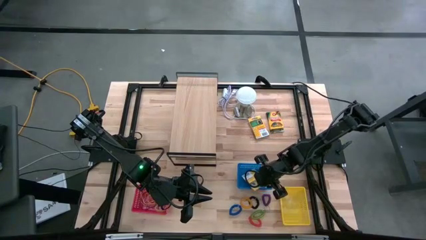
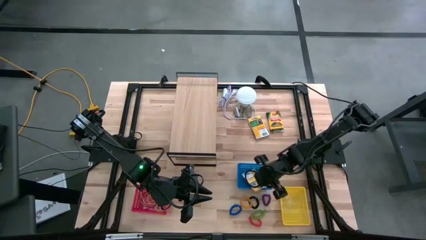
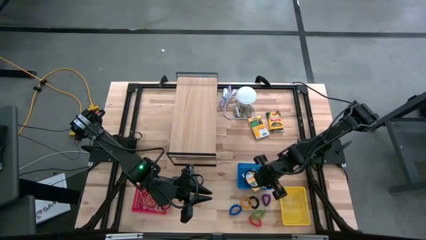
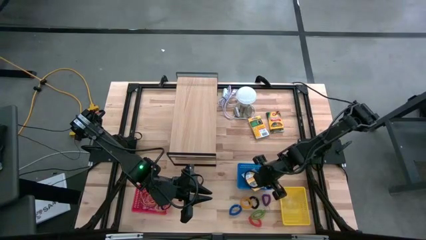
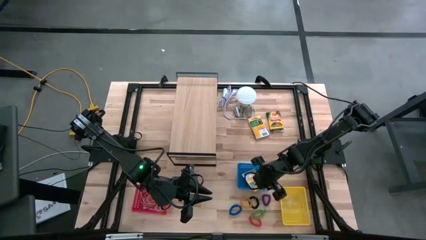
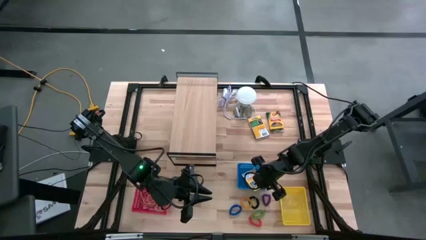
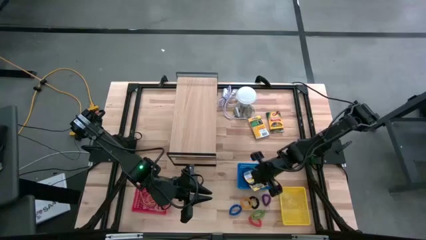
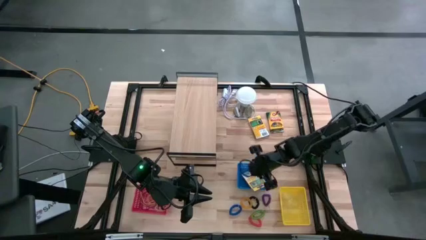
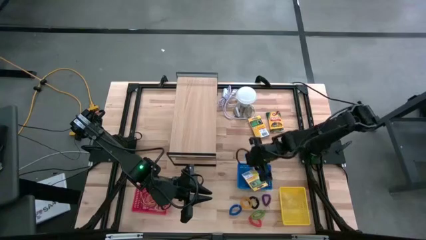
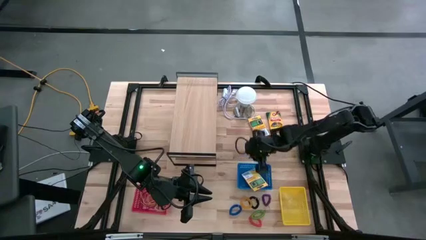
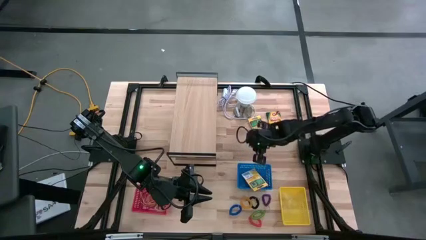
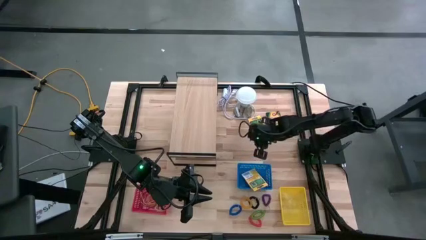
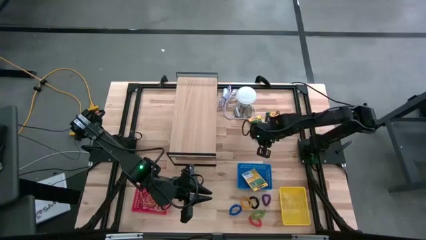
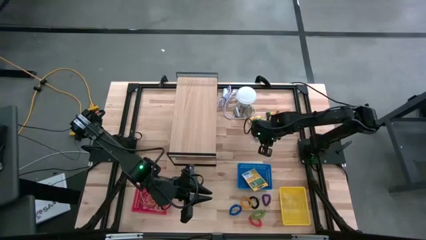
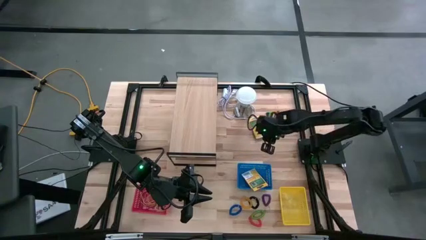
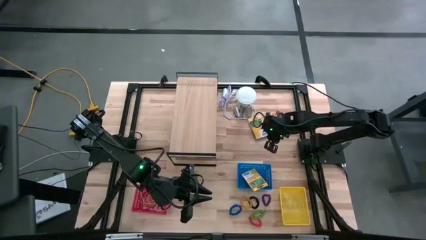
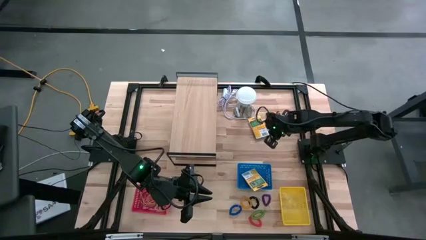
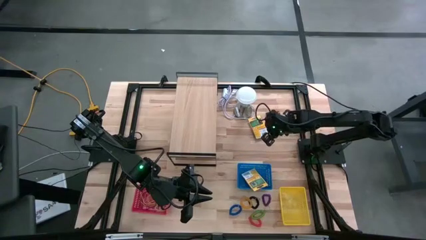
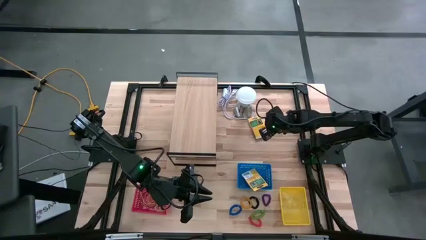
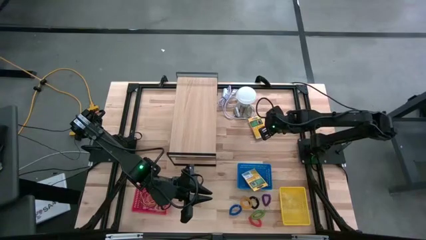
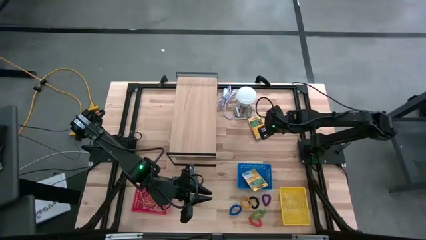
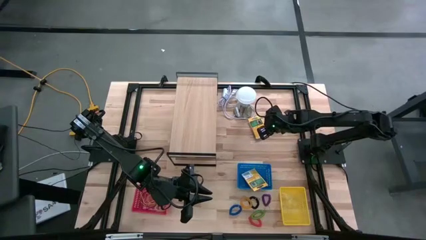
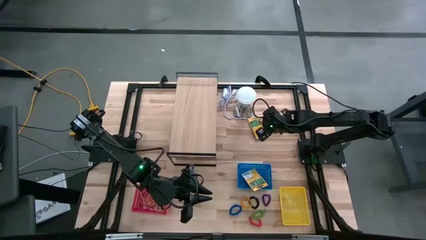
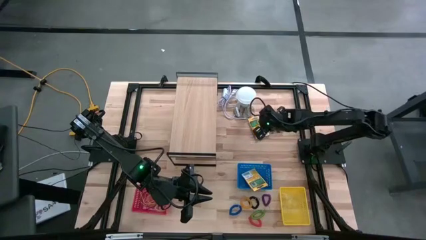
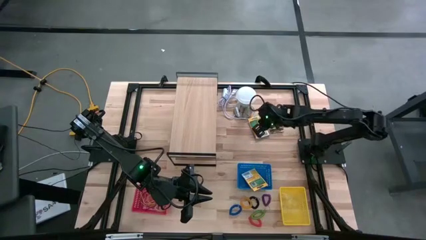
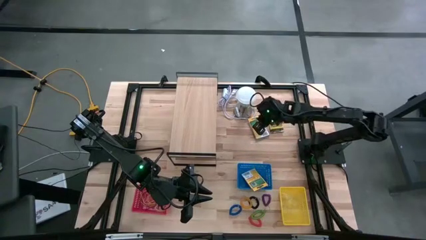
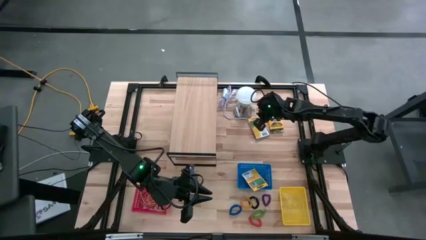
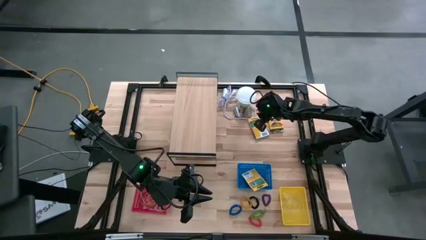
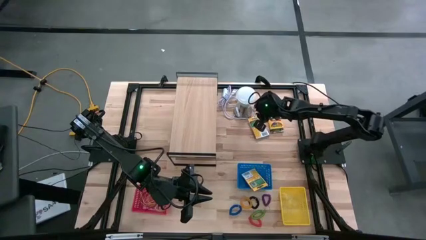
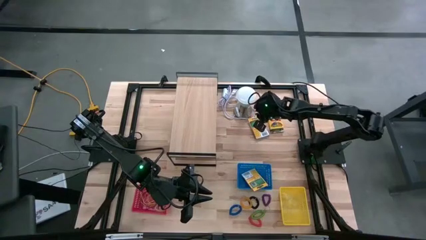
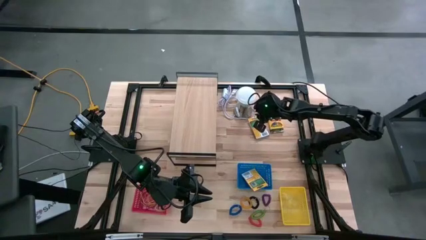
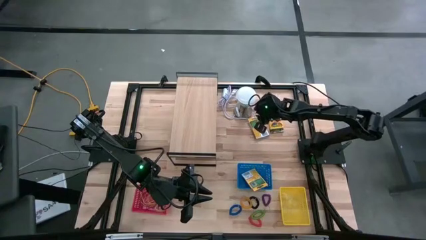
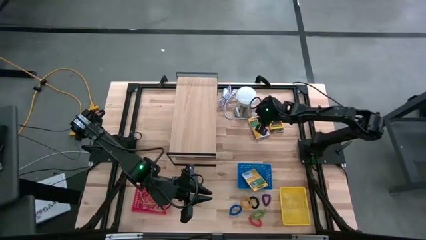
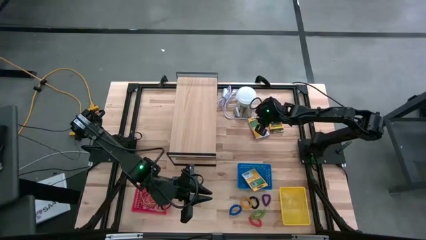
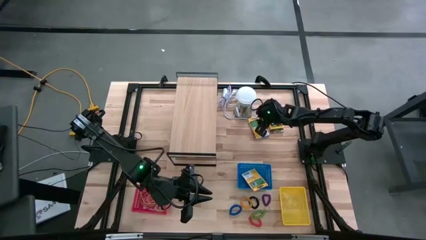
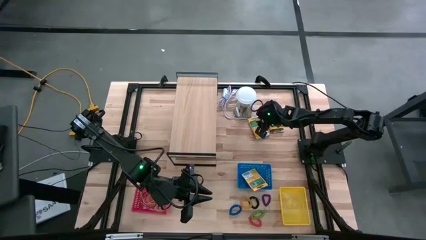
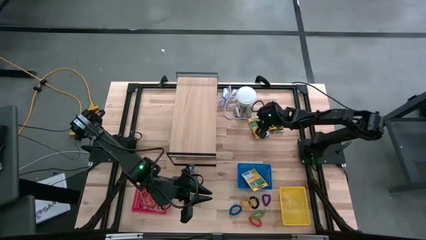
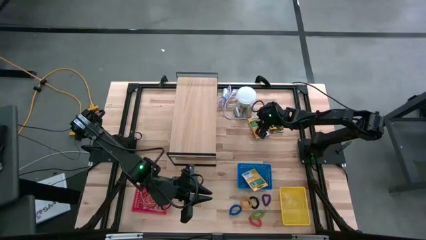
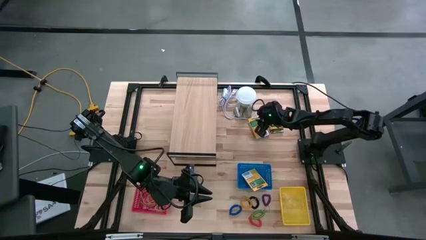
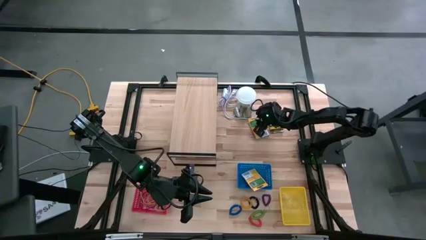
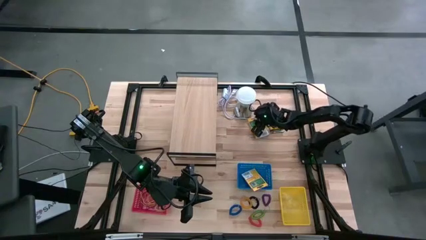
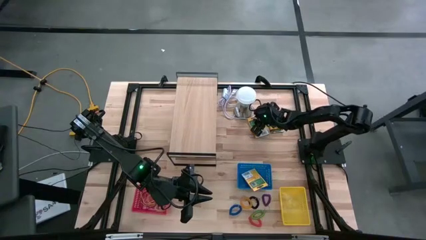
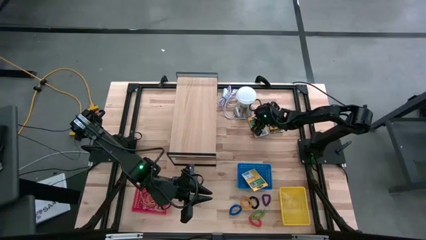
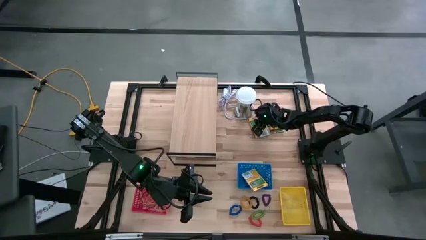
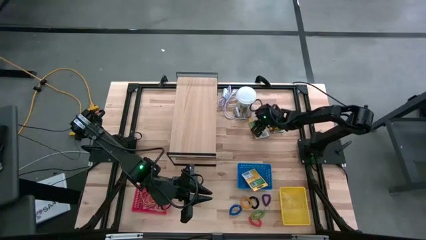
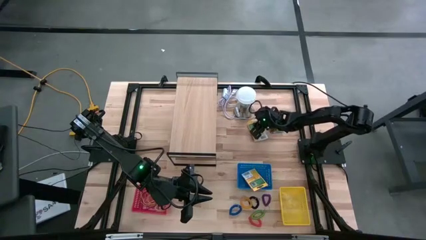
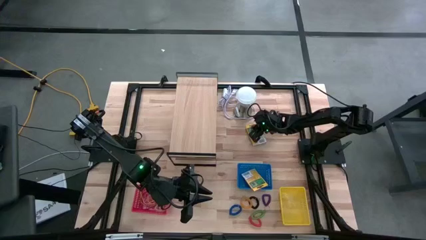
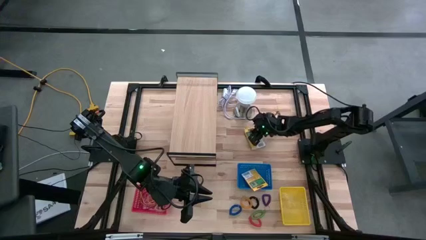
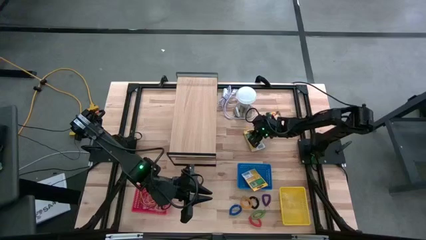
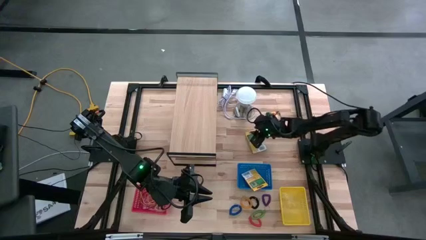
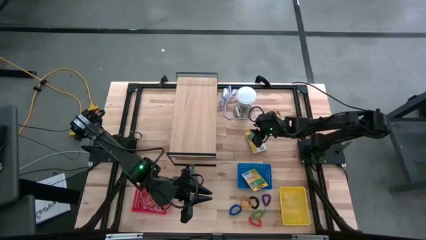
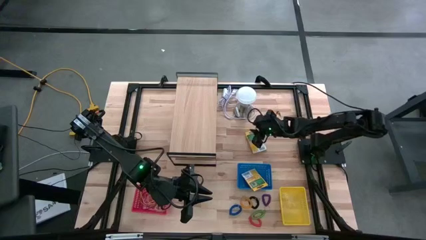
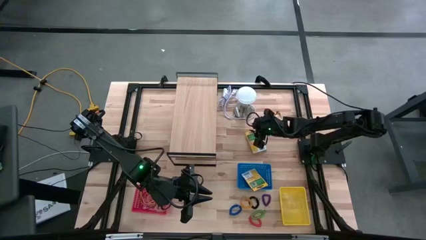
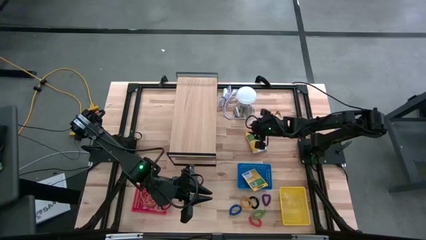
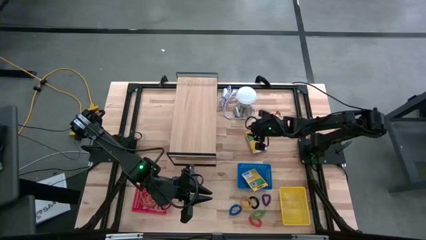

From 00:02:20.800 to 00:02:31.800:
Task: Pick & Place Office Desk Supplies
Put the left yellow crayon box into the blue bin

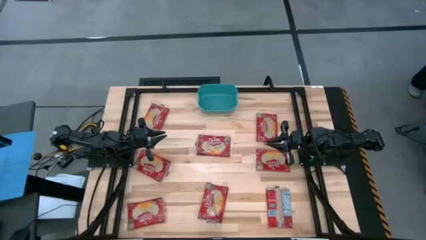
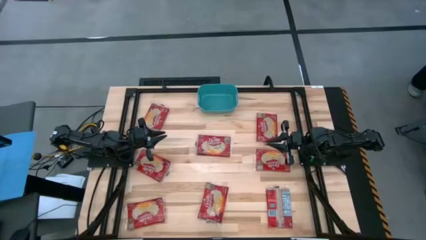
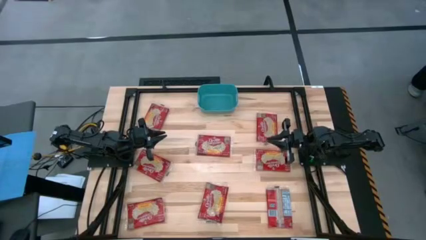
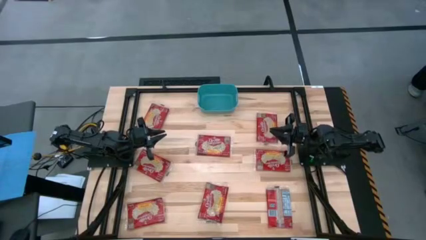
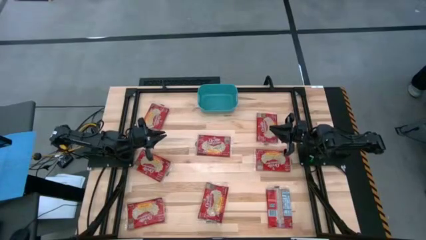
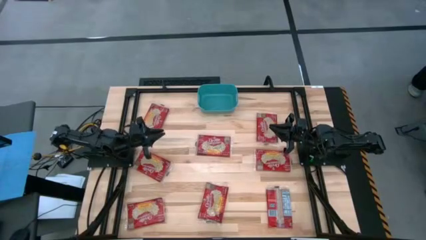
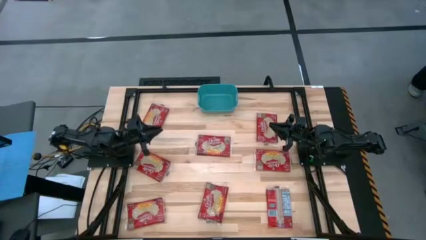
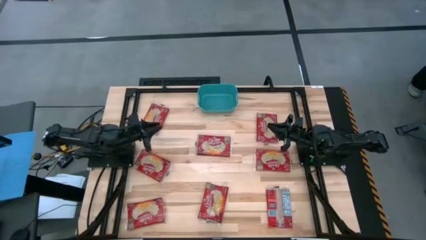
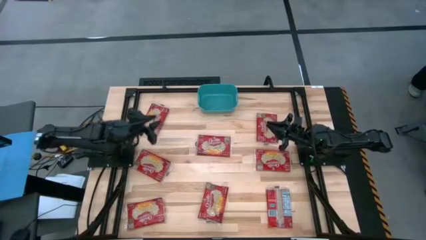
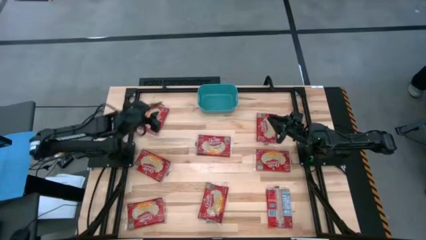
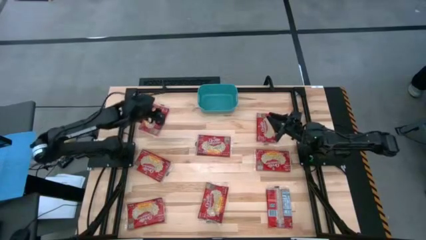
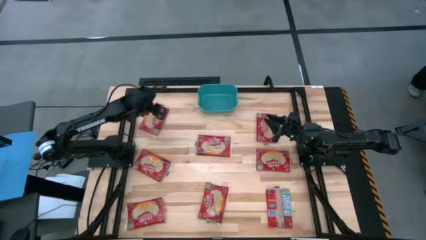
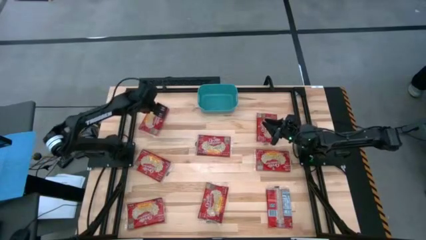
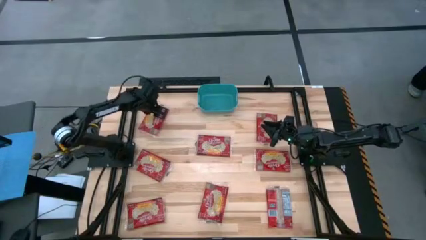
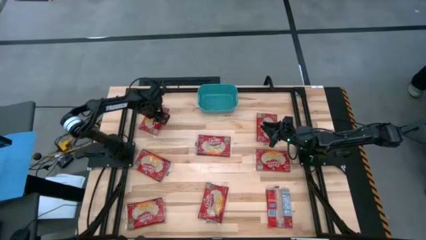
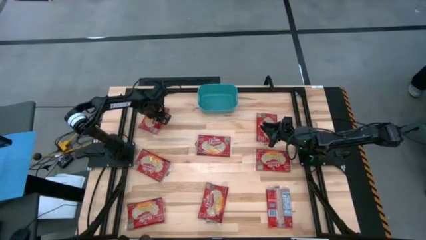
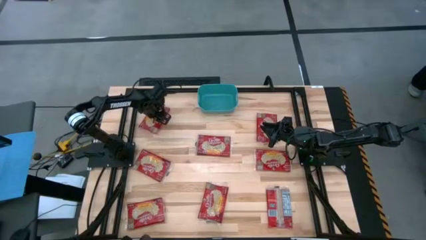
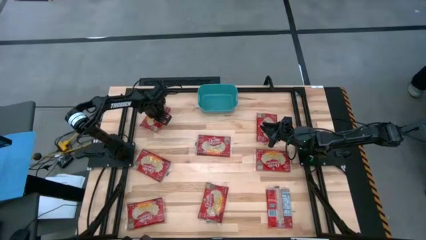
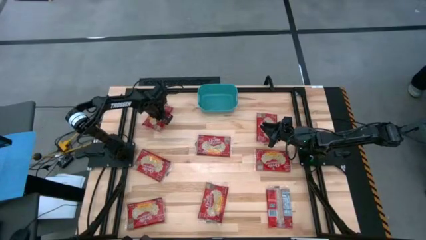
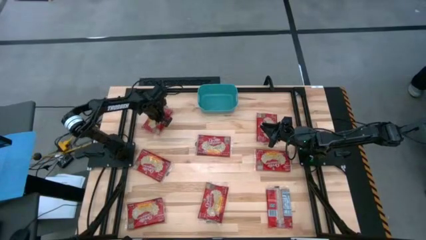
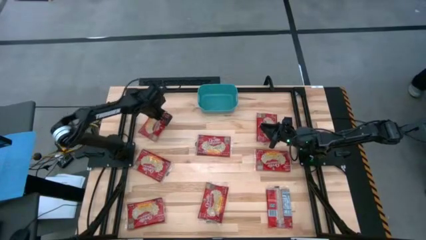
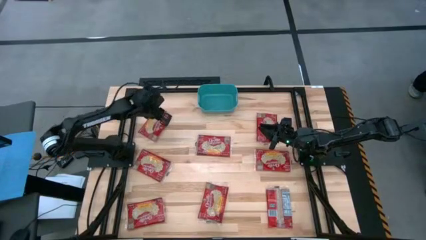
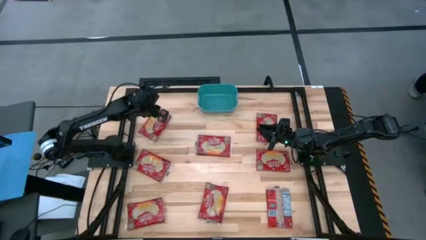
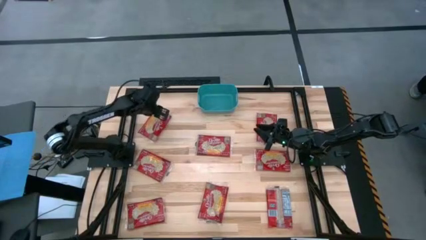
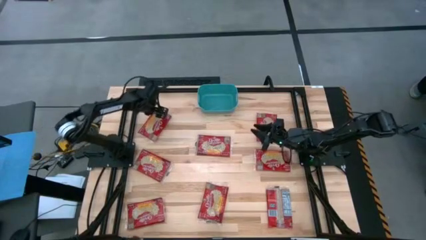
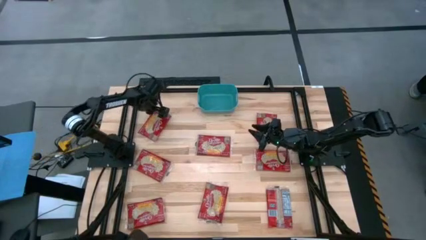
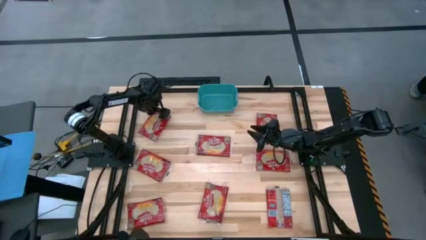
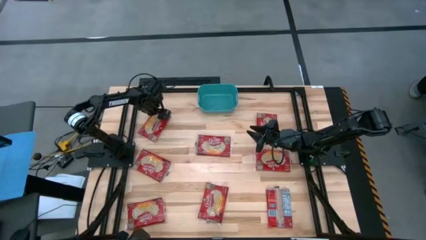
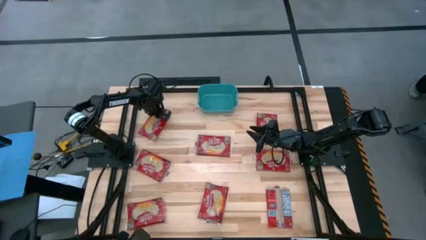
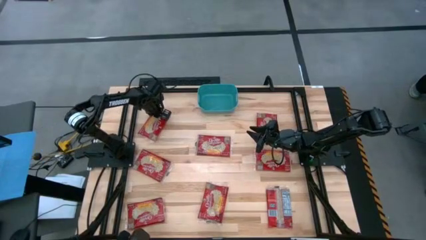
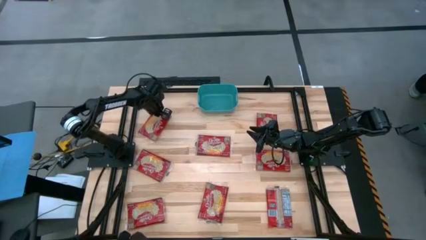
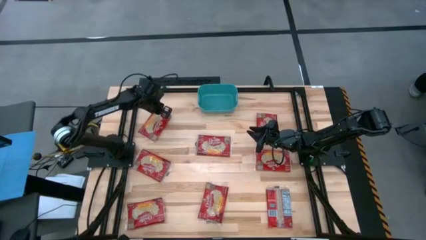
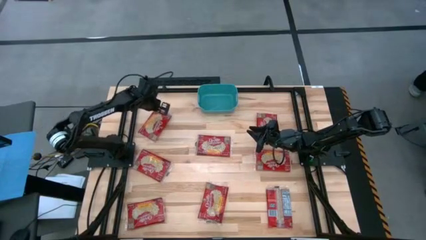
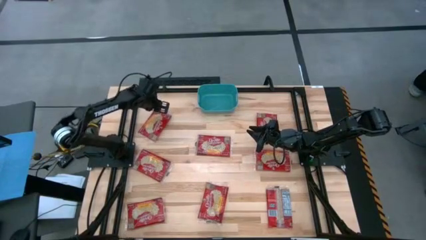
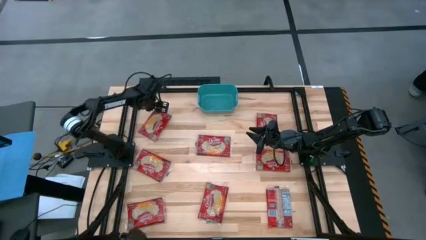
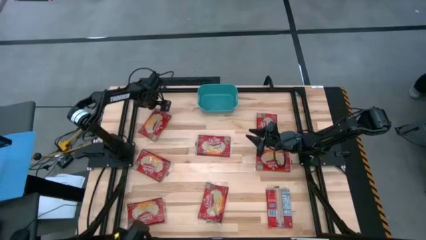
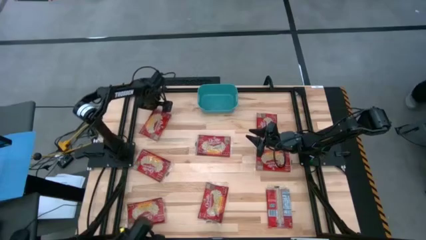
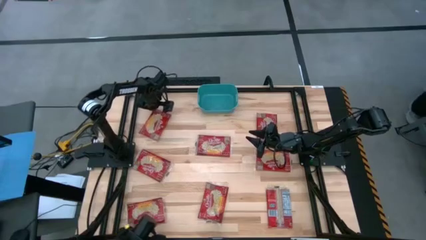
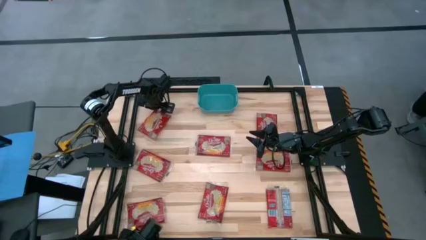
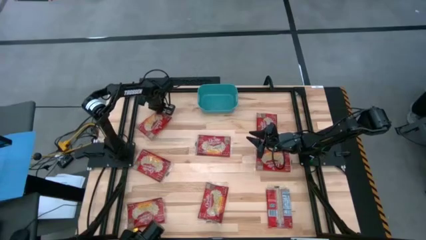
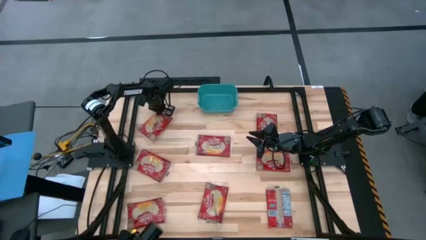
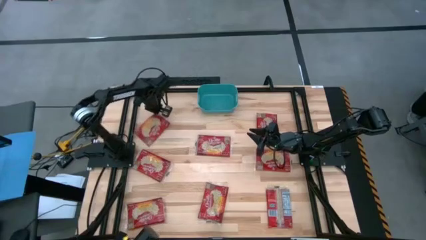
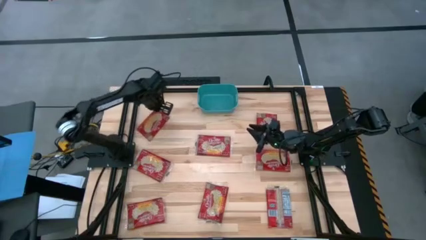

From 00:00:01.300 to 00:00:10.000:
Task: Sort popcorn bags into baskets
Put the red popcorn bag into the blue bin
